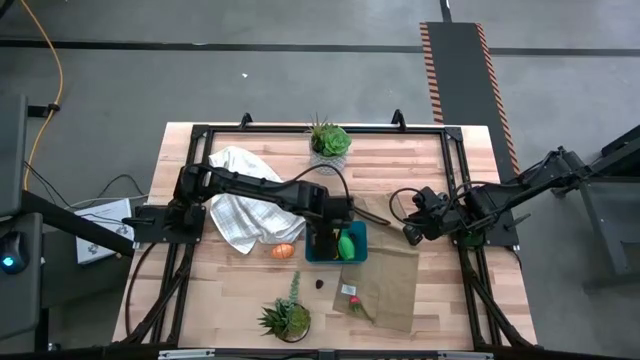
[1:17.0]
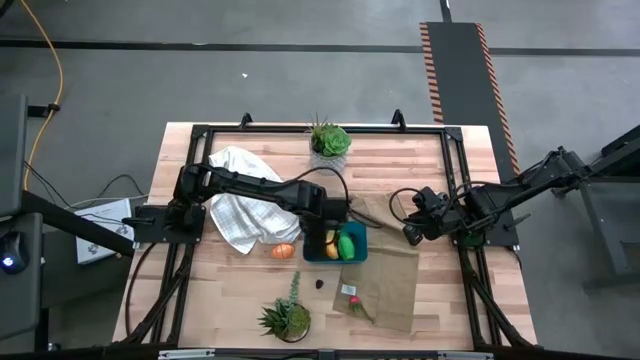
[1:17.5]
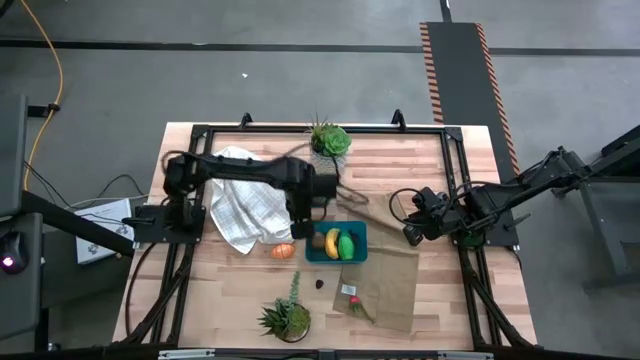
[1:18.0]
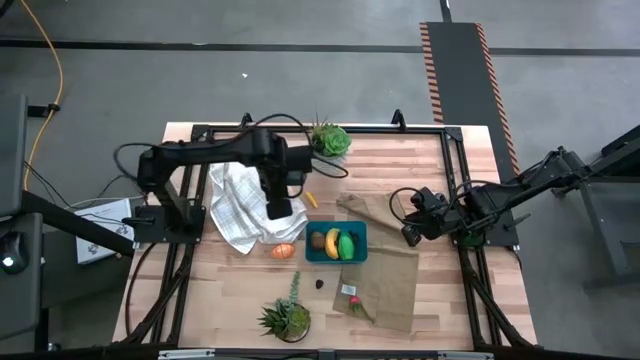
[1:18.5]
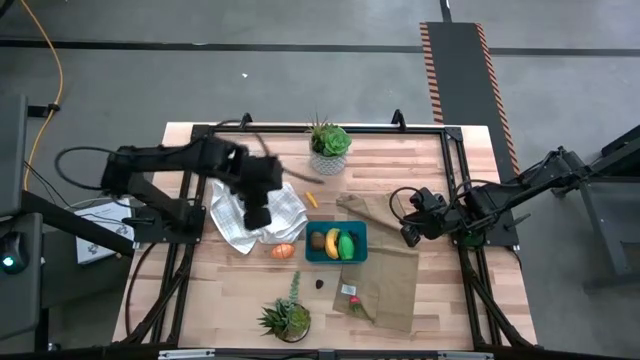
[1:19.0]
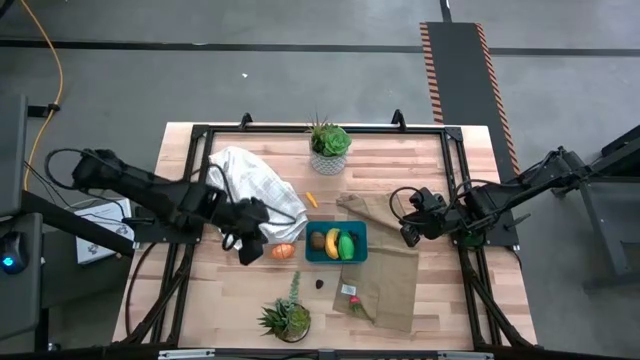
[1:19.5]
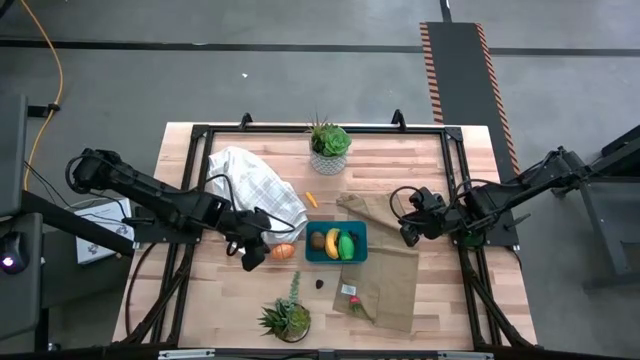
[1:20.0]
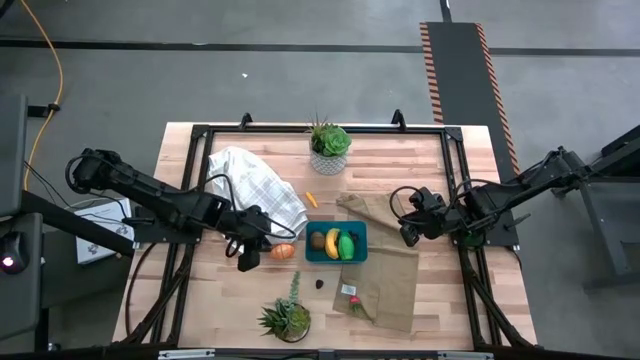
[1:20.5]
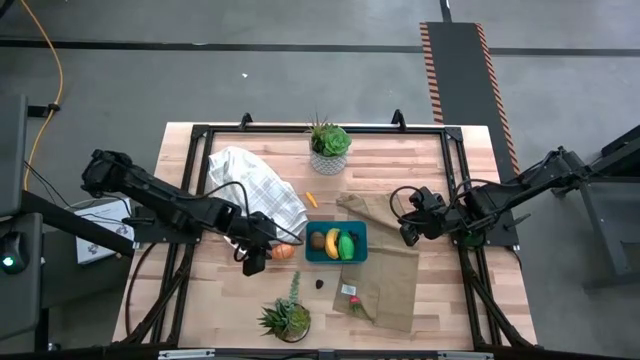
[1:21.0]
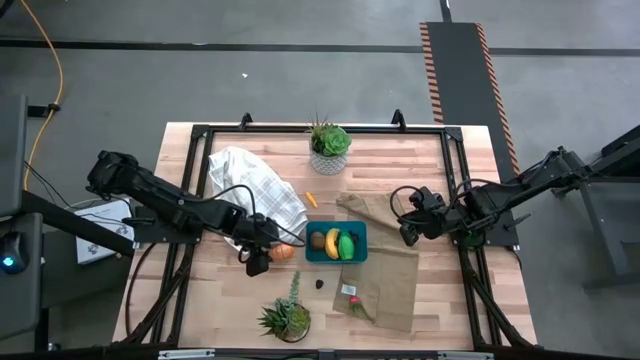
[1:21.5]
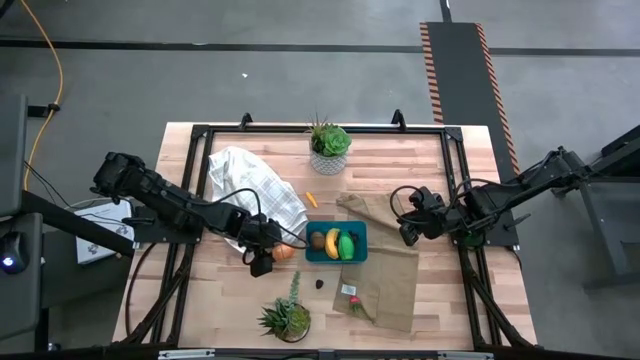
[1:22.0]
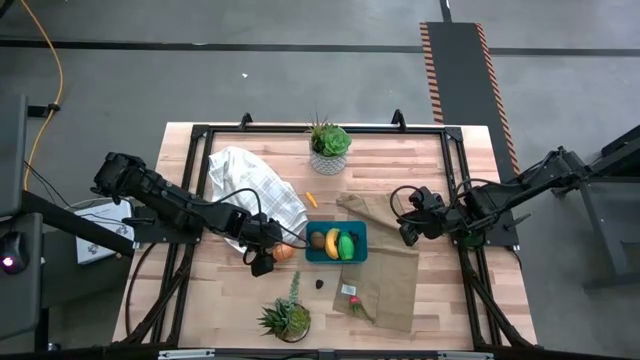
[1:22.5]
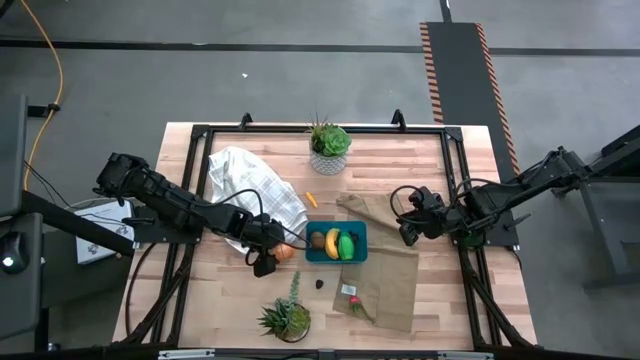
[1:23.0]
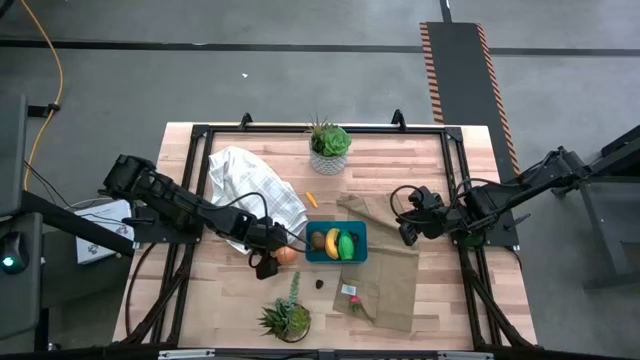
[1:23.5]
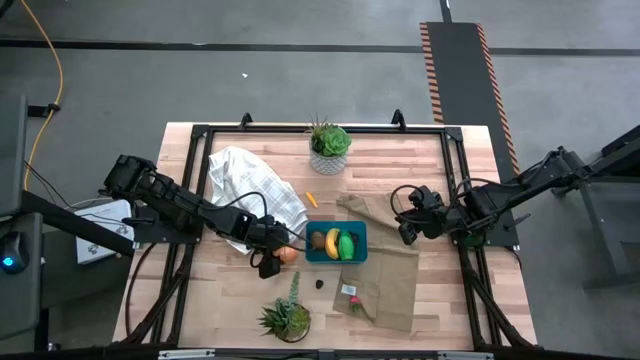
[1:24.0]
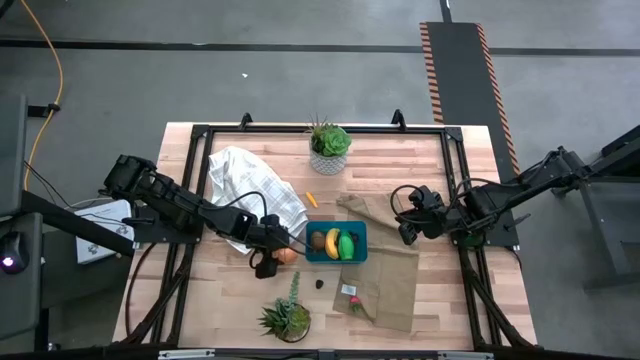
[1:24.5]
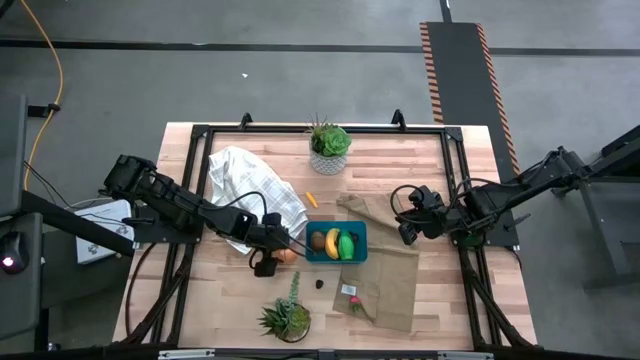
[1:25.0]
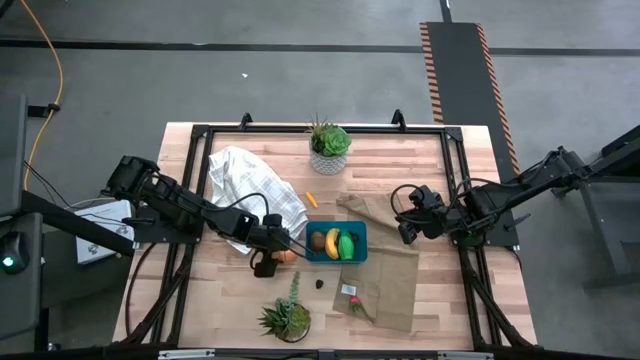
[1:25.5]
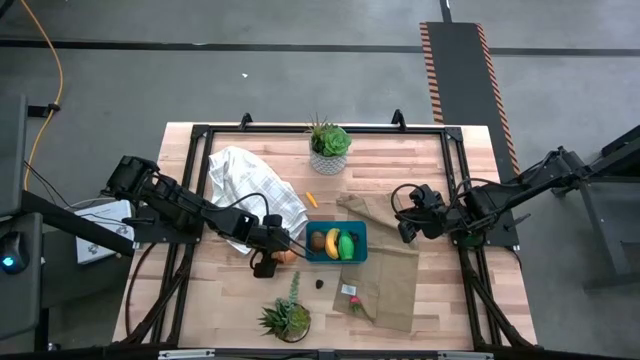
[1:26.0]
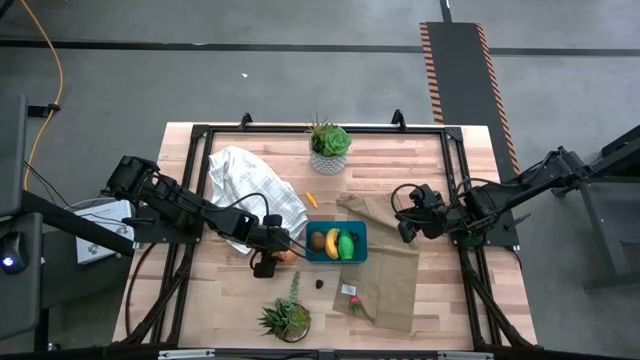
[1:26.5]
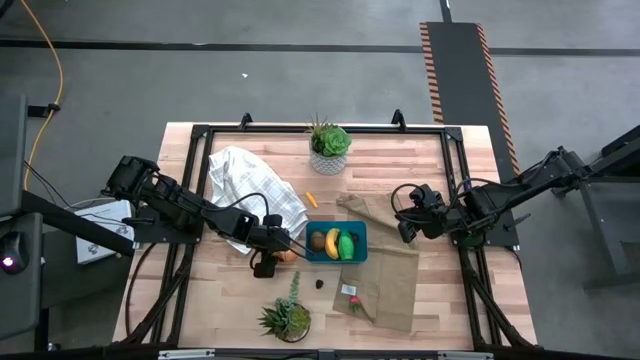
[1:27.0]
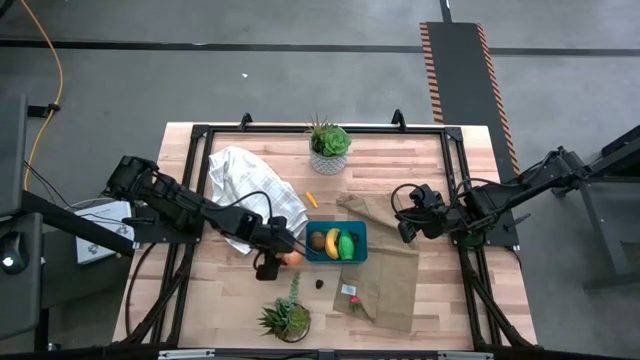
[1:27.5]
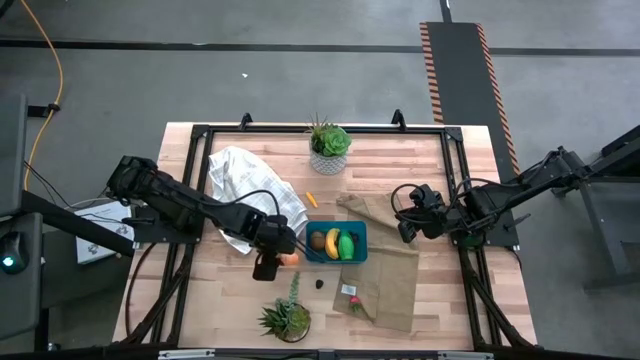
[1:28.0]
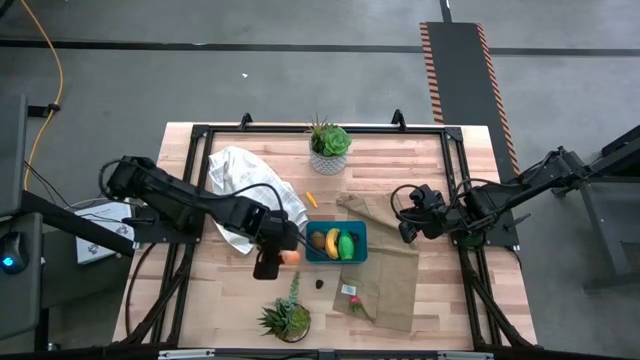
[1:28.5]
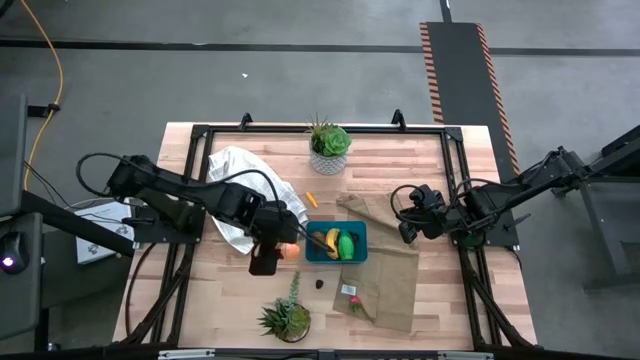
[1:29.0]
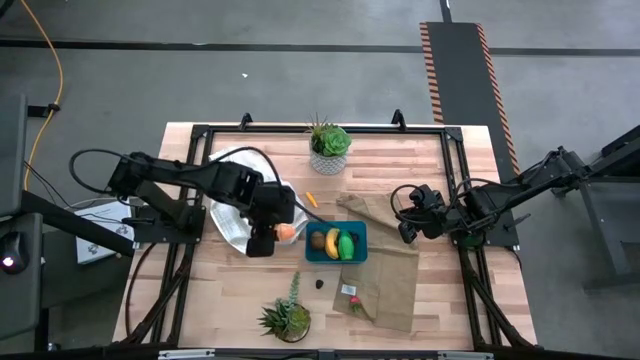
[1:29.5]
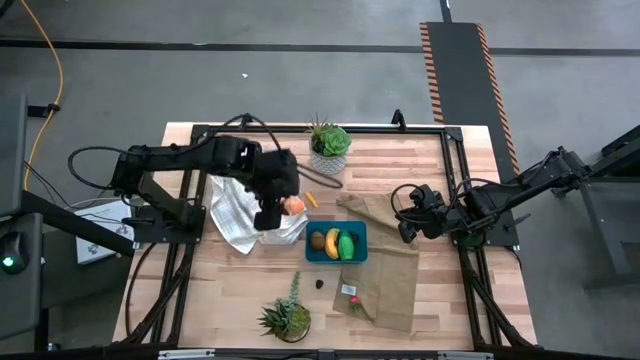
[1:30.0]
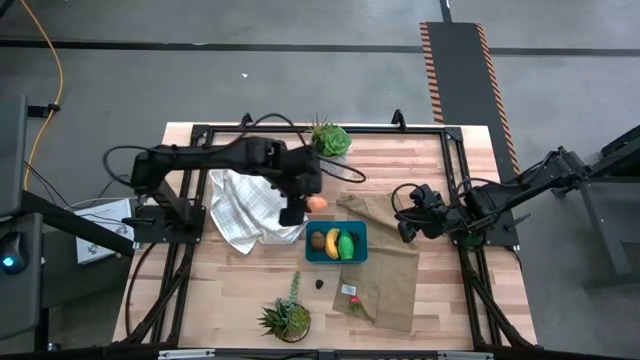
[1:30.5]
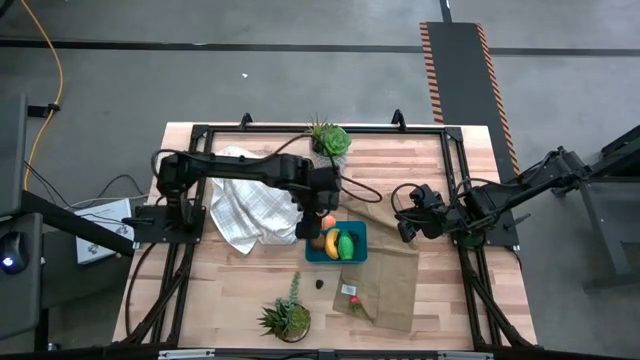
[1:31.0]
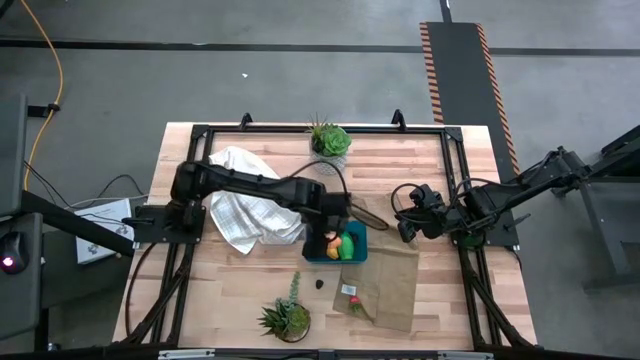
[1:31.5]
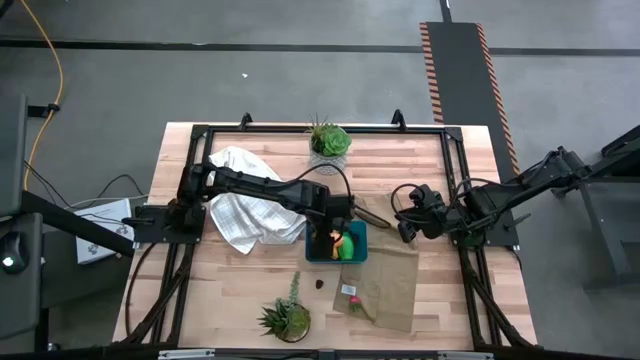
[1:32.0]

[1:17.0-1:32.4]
Task: Pick and placing Produce into tupperware
Put the brown croissant into the blue bin

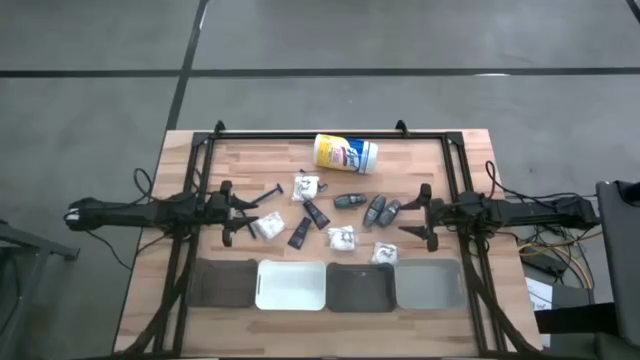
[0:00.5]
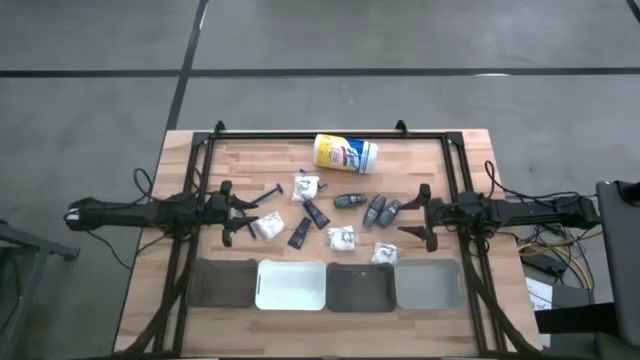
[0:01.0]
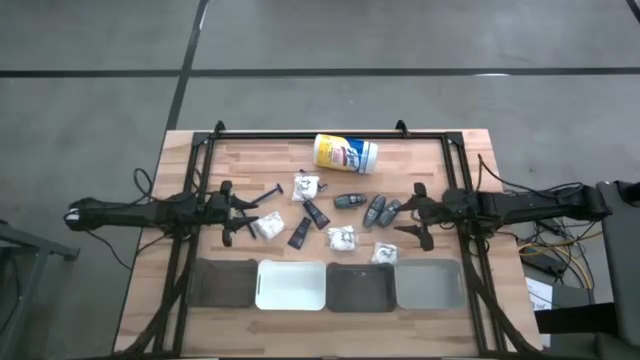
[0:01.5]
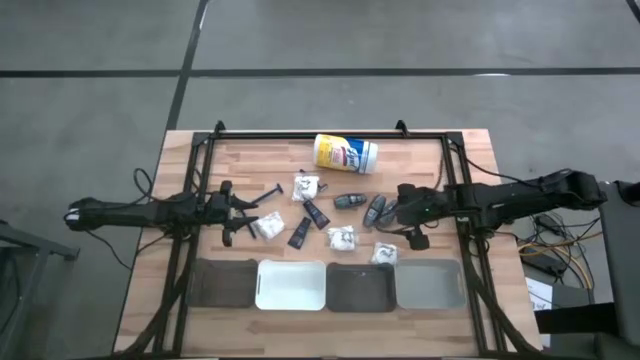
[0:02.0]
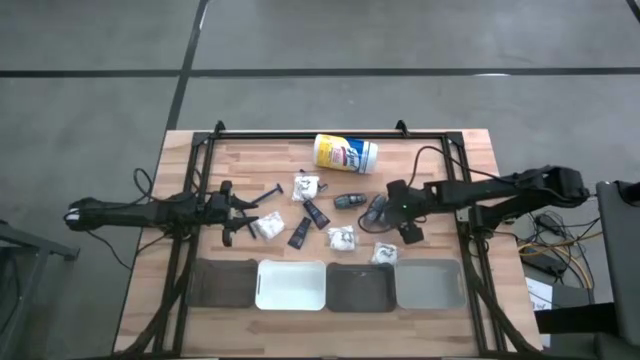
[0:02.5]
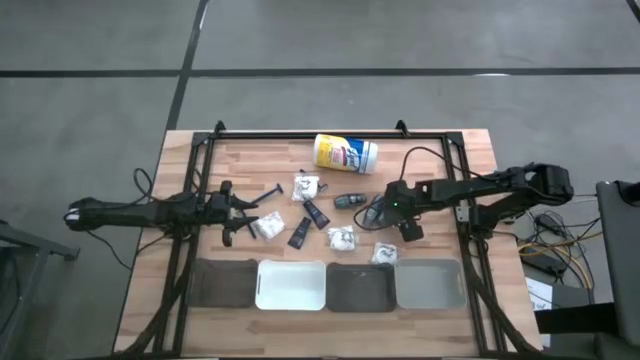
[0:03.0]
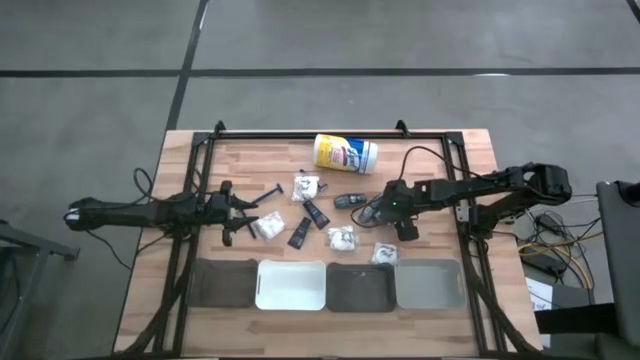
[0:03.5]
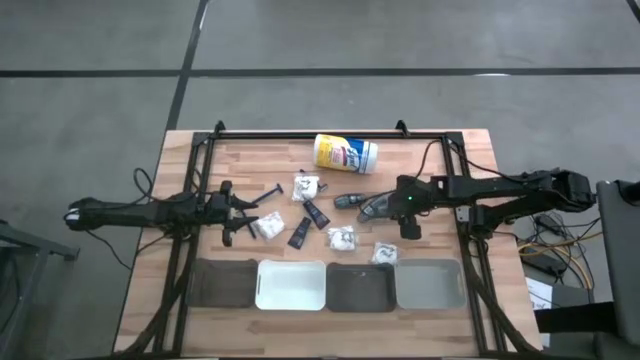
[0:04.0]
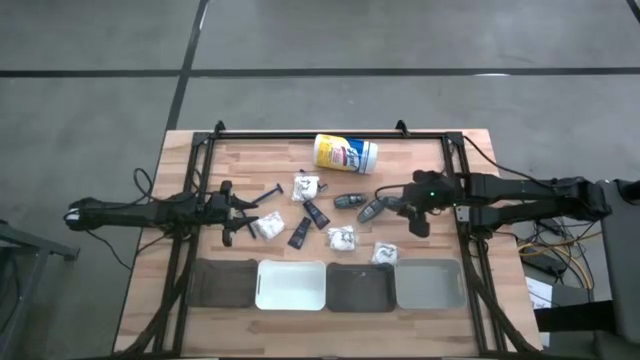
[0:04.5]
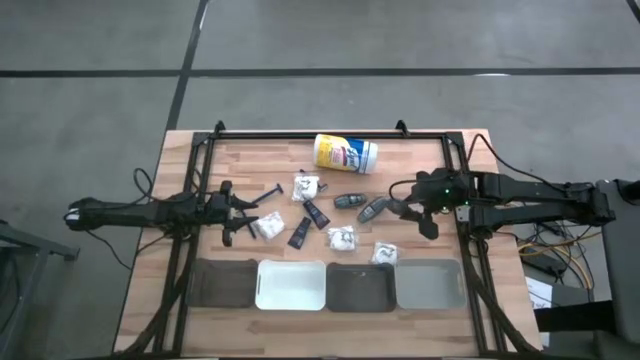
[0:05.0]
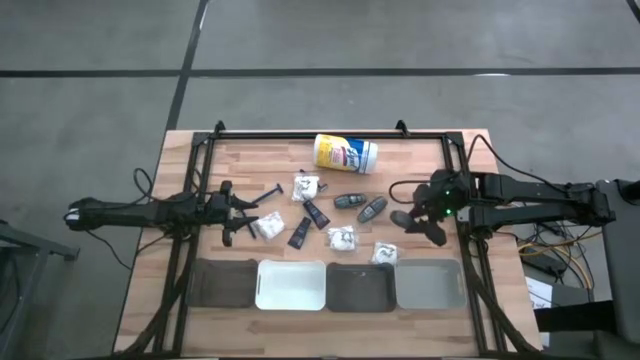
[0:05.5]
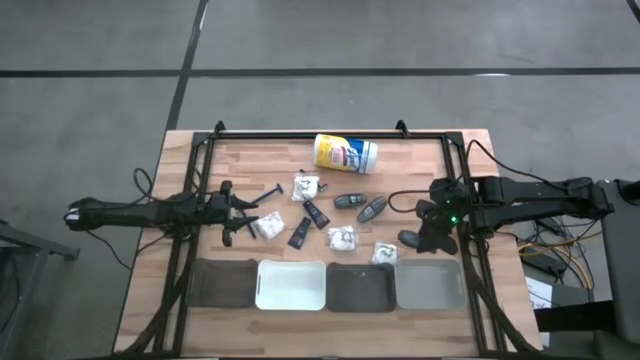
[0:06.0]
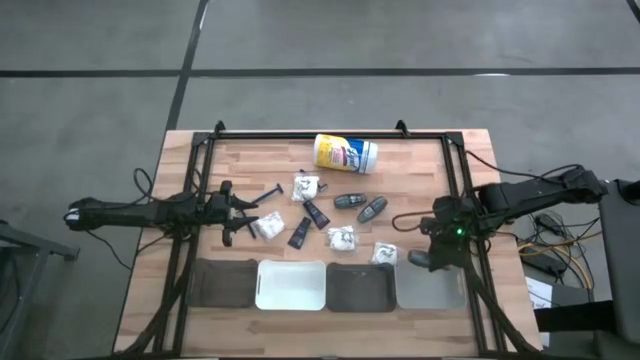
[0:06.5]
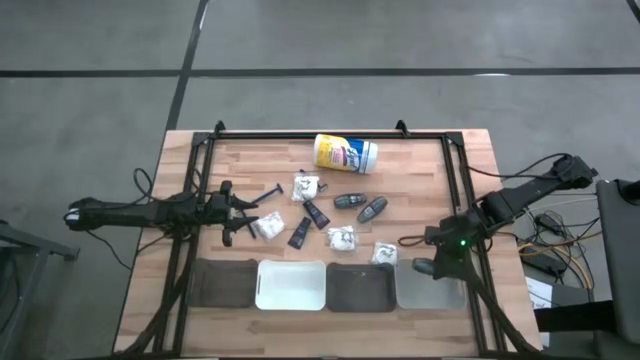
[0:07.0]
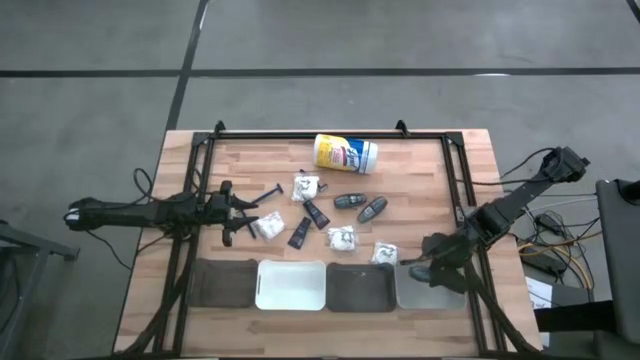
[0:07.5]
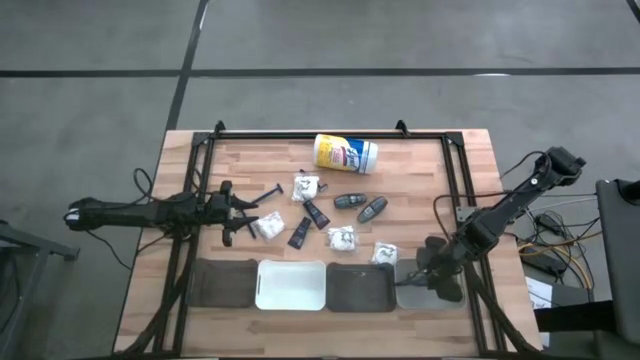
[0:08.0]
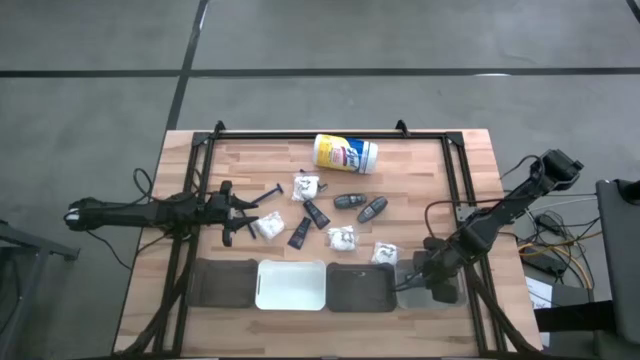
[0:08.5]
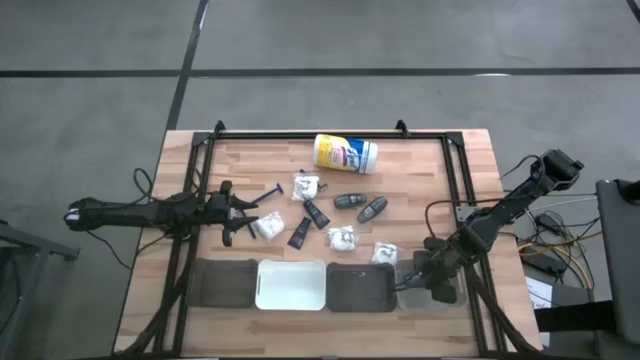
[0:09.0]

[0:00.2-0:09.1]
Task: Pick & Place Travel size toiletries
Put the gray deodorant into the gray bin
